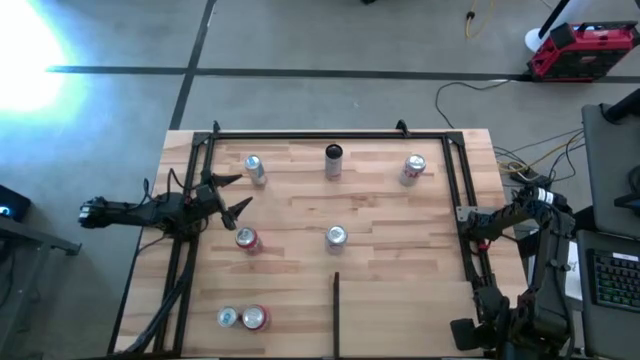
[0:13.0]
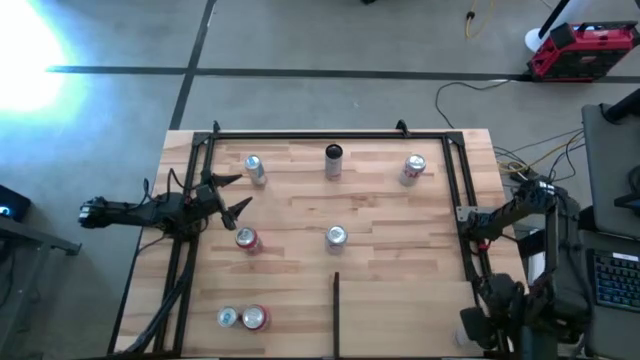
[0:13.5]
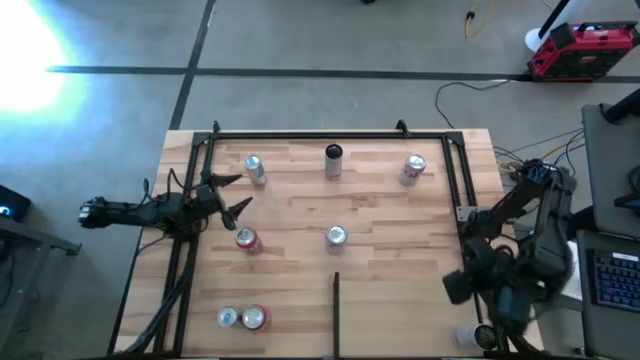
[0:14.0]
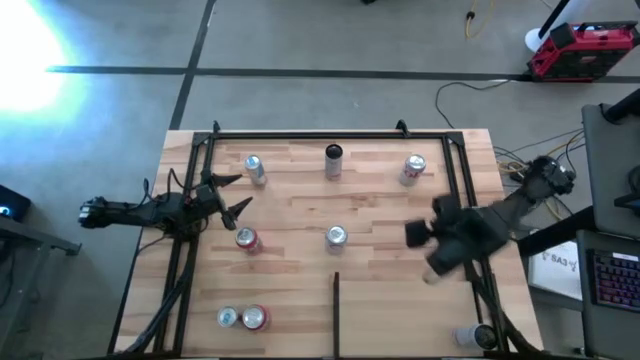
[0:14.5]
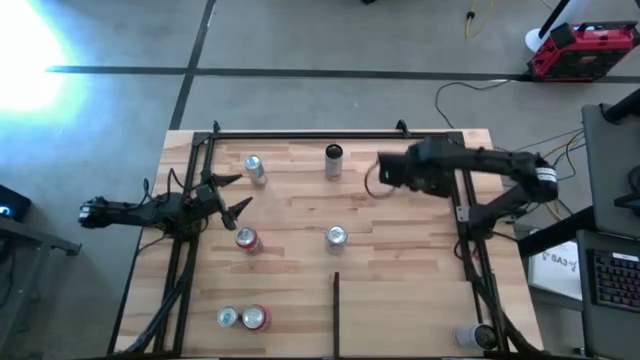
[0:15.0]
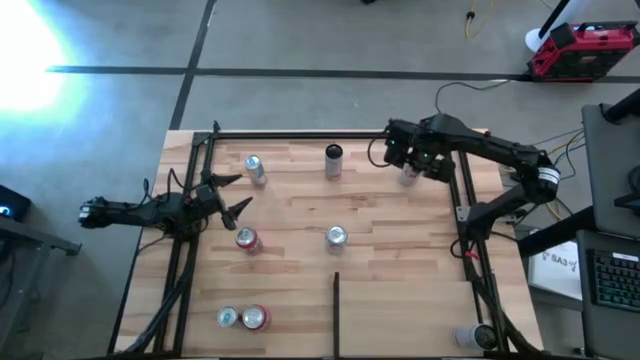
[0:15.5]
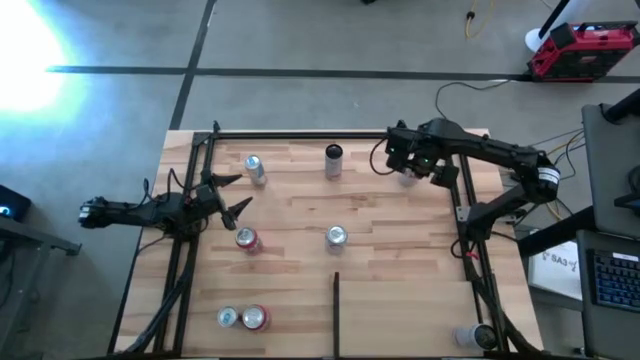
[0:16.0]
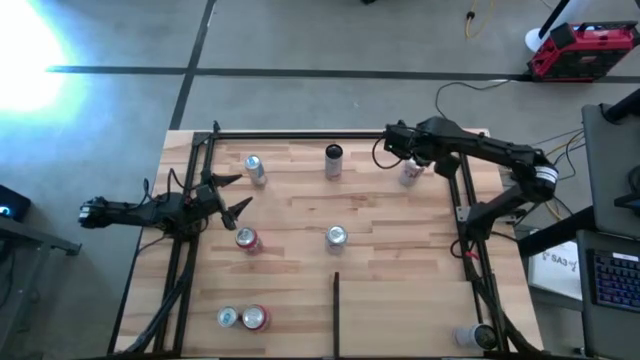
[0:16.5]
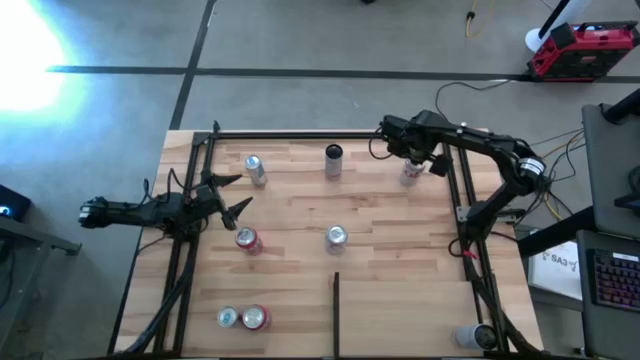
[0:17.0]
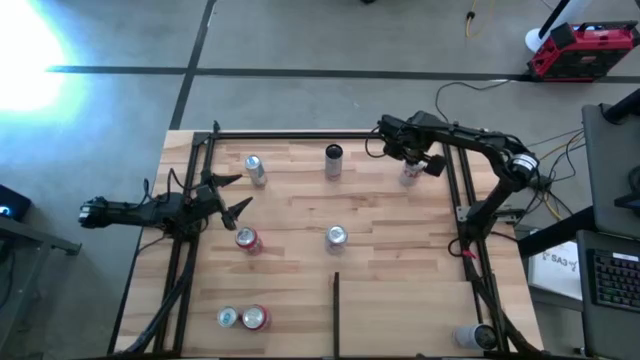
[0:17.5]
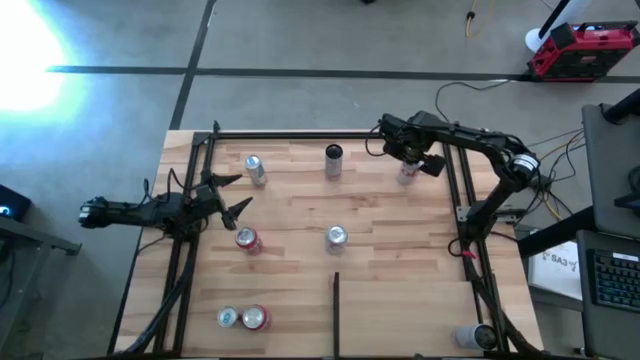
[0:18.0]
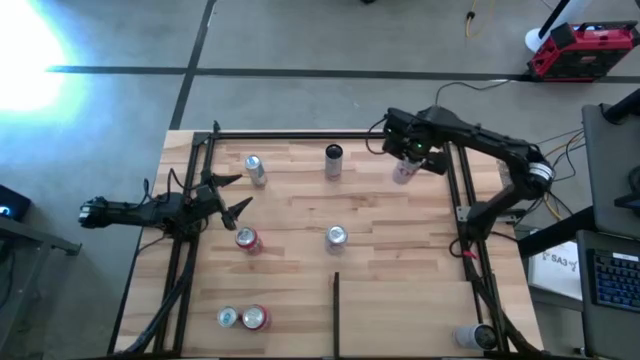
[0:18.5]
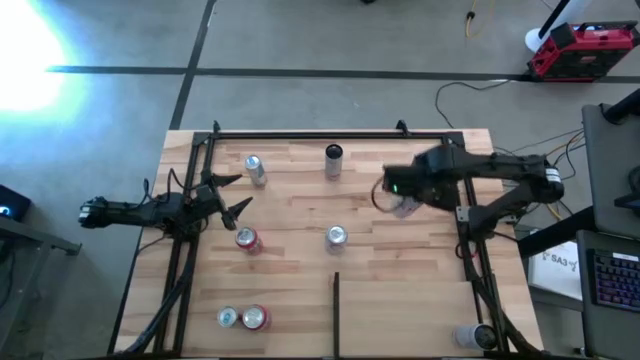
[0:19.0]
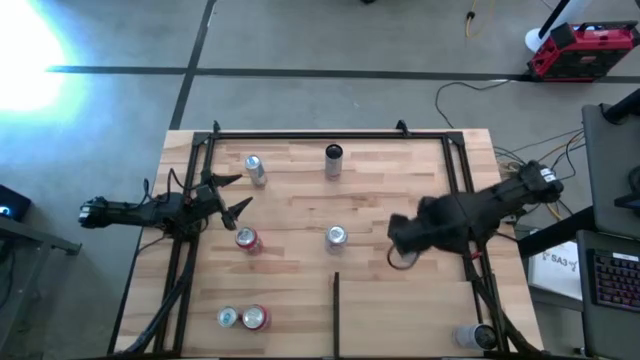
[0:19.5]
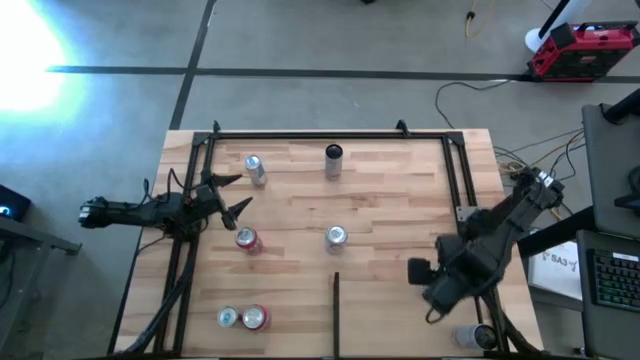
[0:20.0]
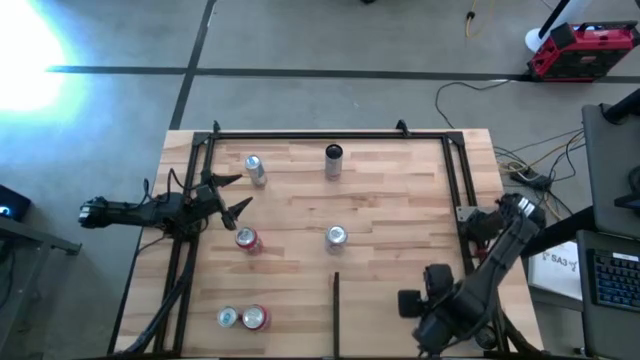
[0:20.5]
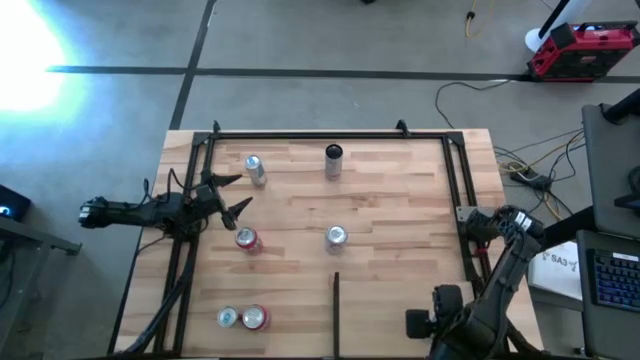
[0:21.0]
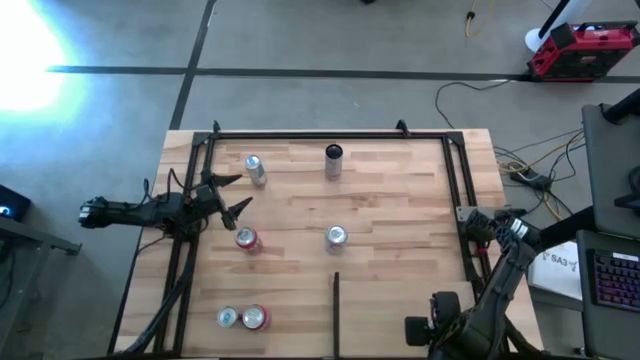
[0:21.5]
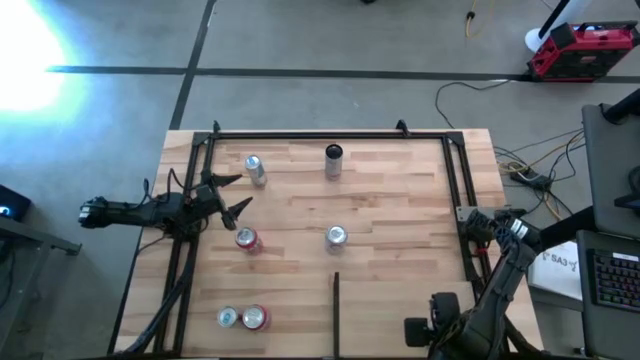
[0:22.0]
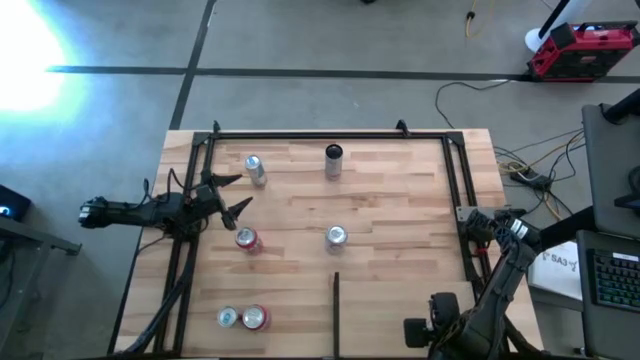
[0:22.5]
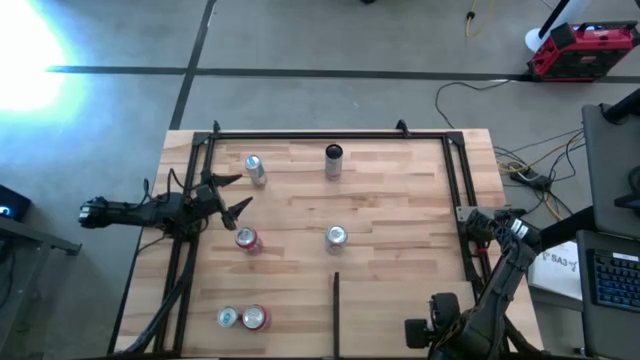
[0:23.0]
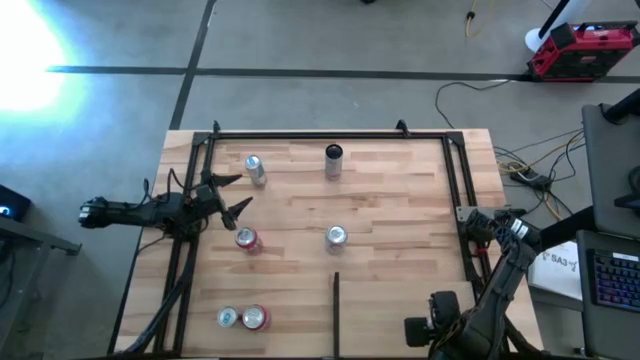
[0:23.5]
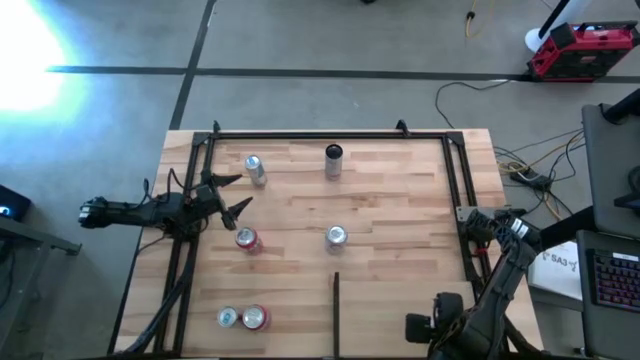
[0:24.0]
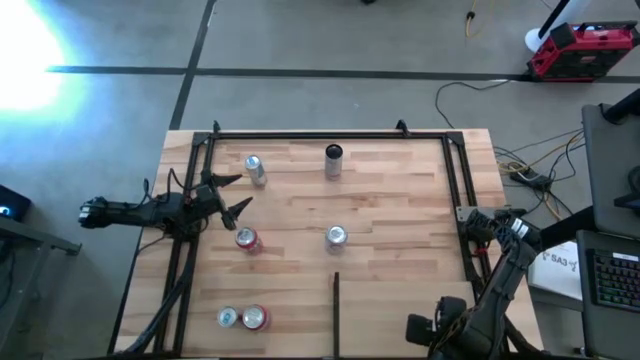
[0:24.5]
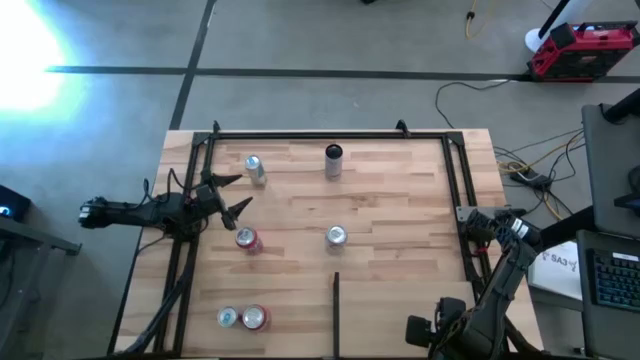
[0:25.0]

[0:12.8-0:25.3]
Task: Place canned beverage on shelf
Put the top white/red soda can on the the shelf

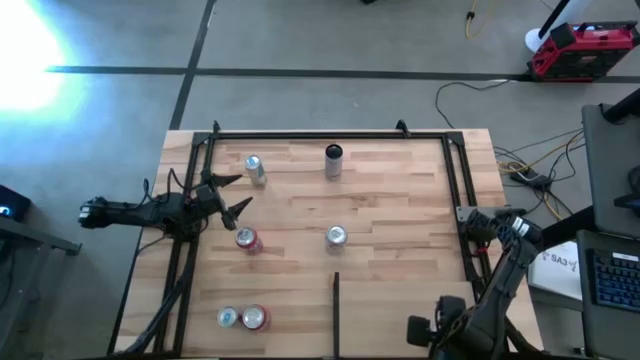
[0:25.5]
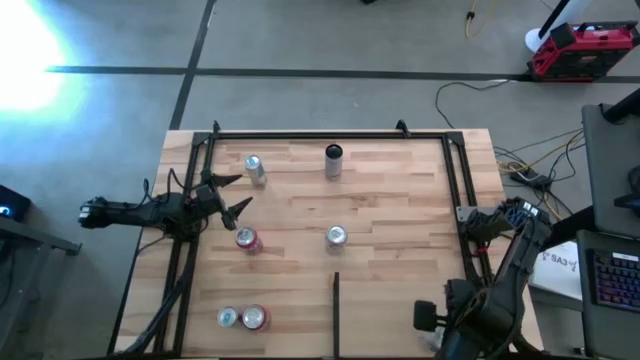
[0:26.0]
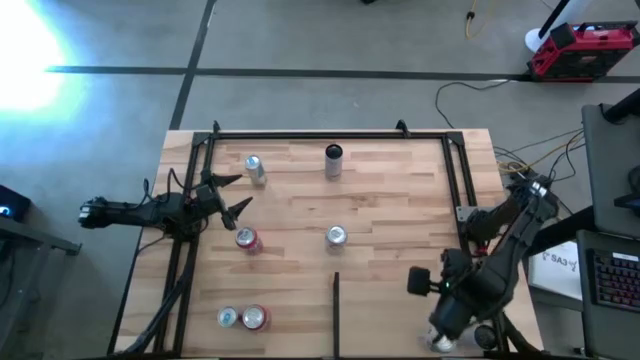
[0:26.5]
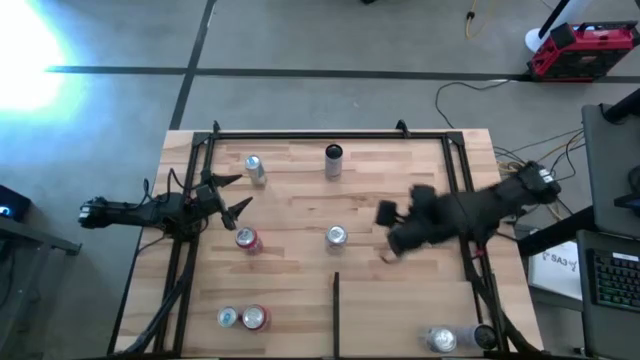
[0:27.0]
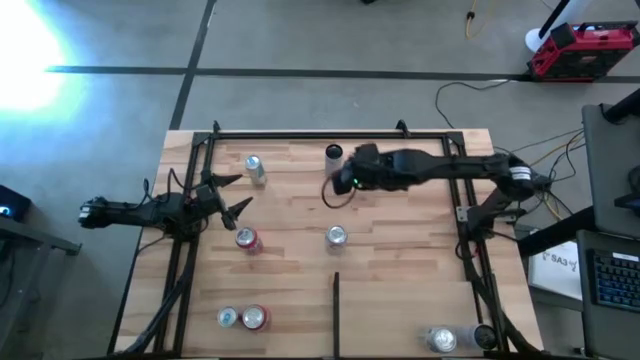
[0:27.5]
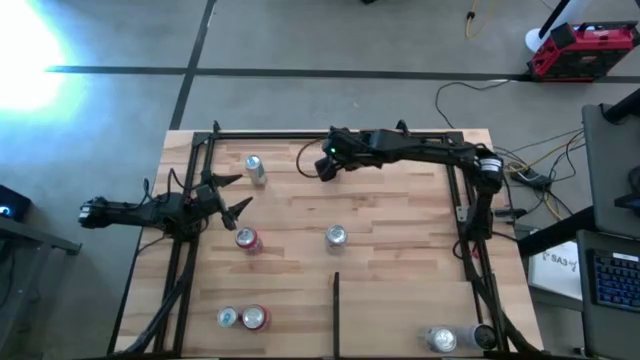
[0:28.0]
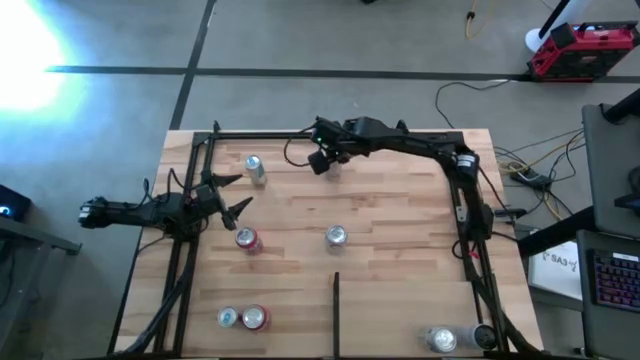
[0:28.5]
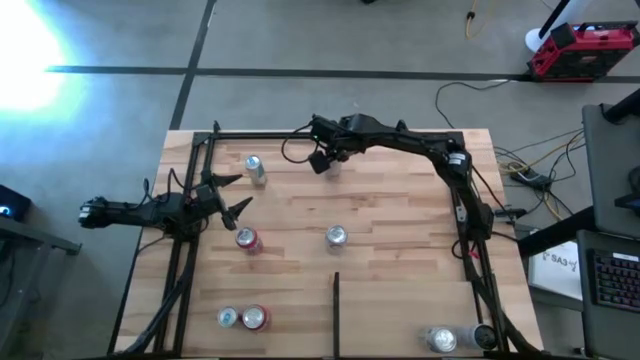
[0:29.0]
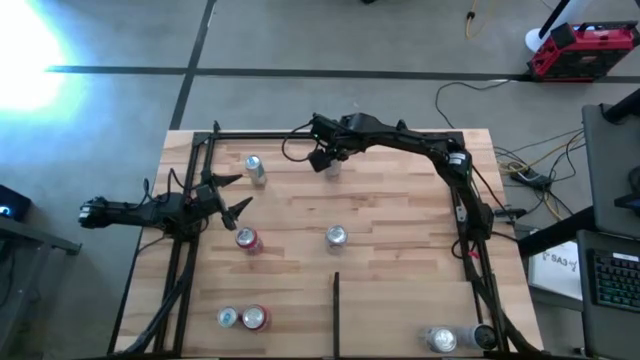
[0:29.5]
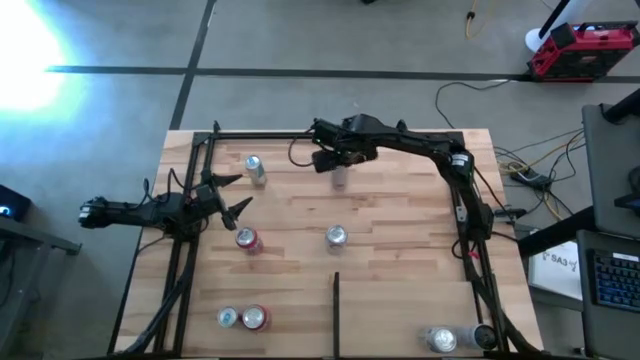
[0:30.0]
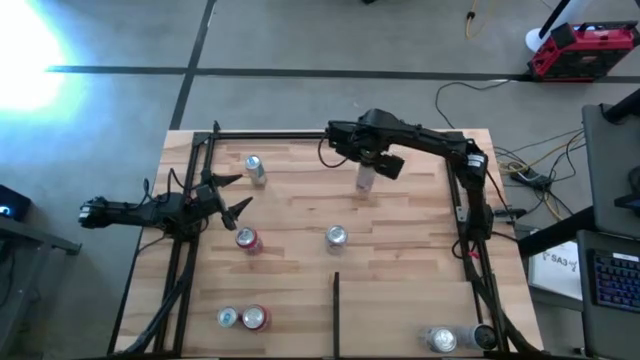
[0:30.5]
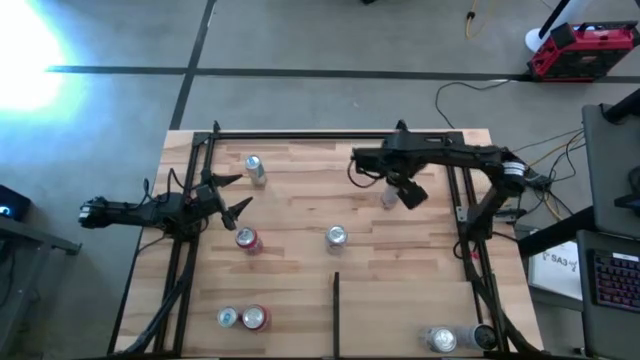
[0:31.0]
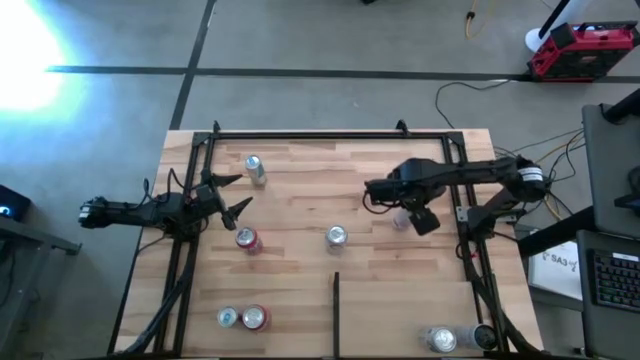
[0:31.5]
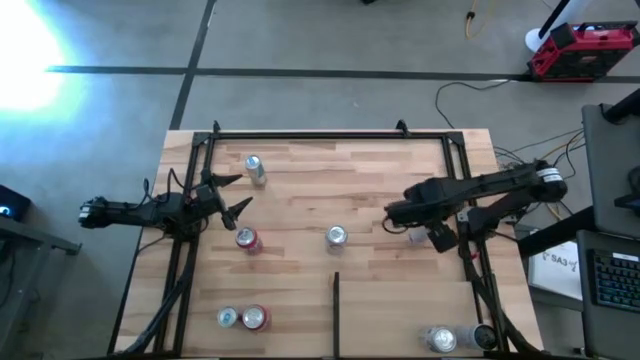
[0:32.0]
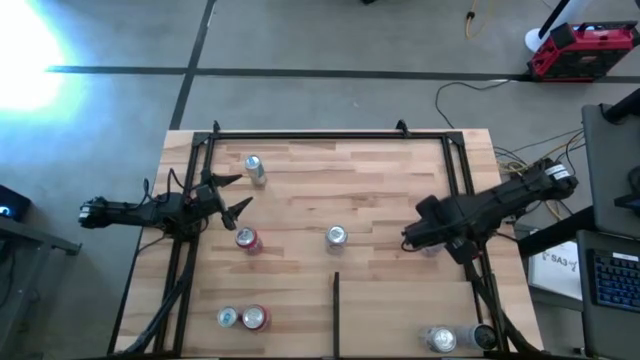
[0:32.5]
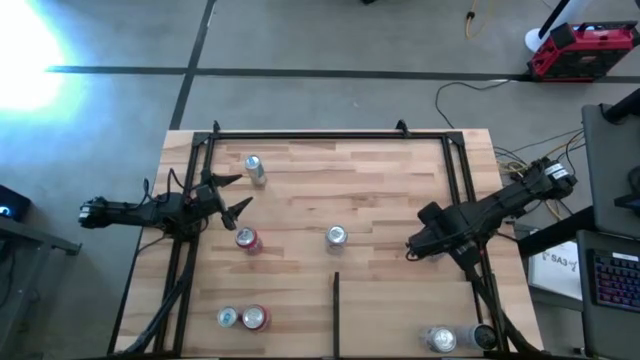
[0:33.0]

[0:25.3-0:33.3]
Move the white soda can from top middle to right on the table
